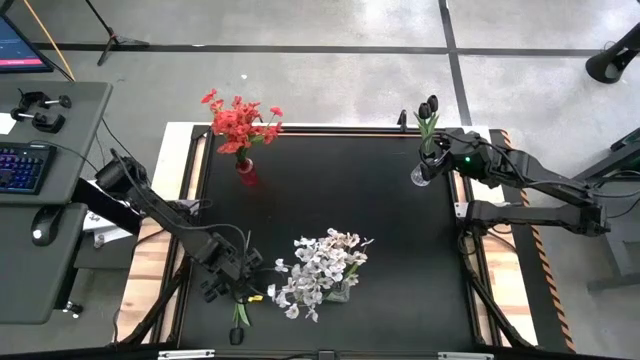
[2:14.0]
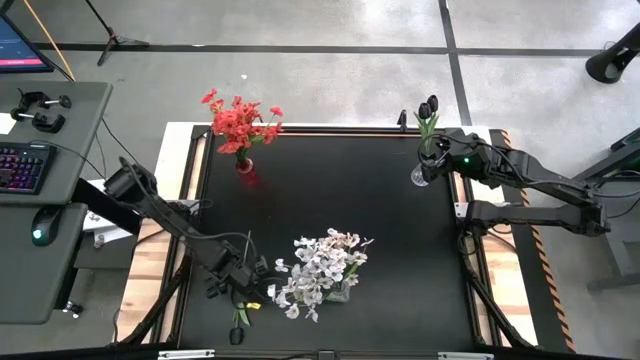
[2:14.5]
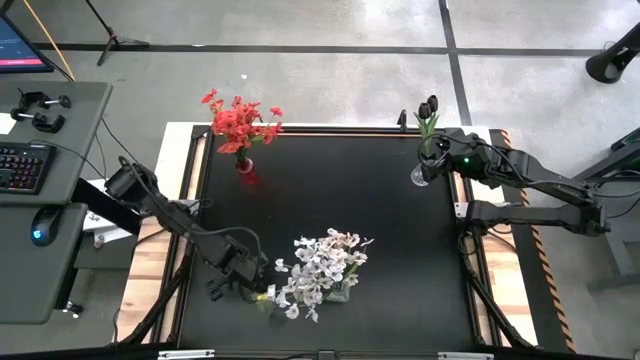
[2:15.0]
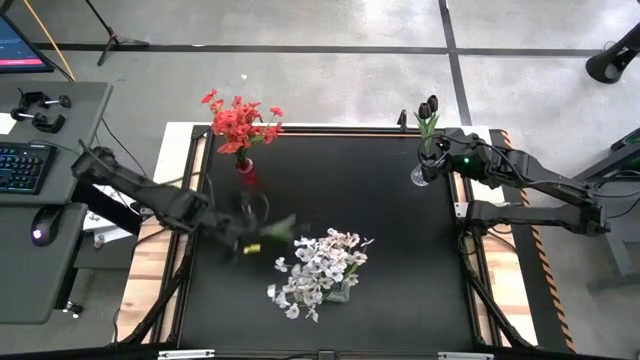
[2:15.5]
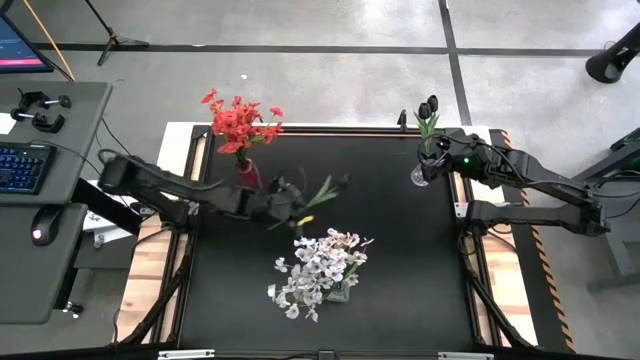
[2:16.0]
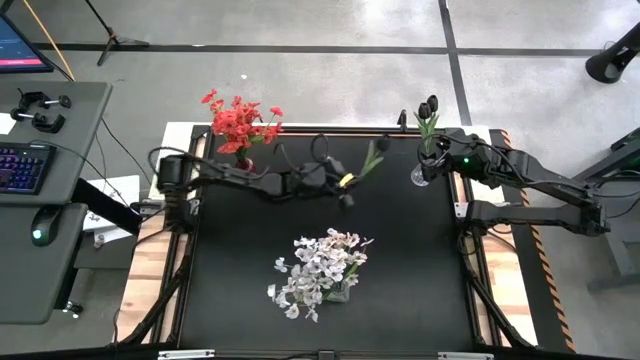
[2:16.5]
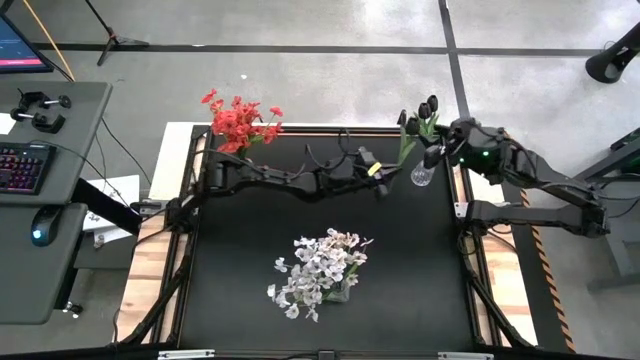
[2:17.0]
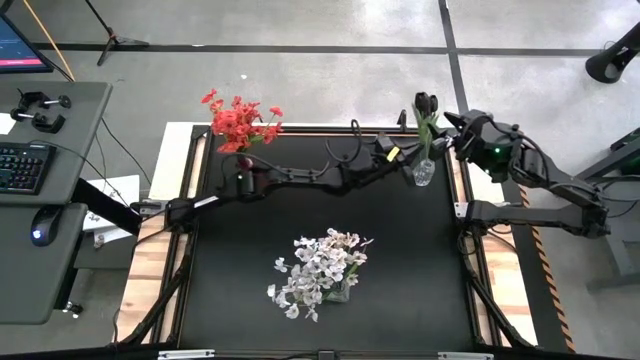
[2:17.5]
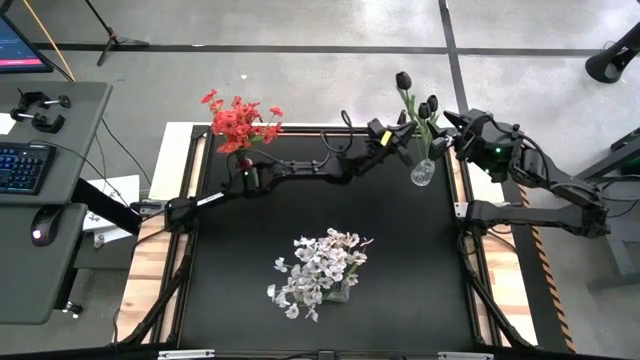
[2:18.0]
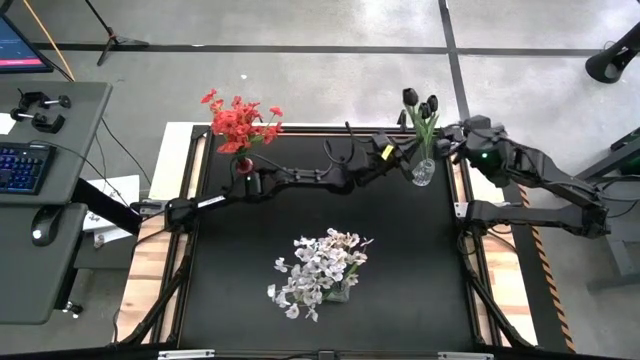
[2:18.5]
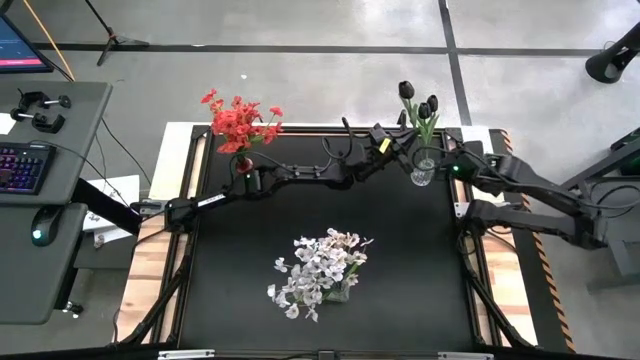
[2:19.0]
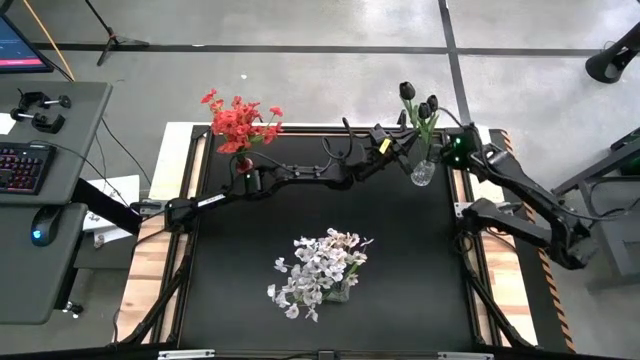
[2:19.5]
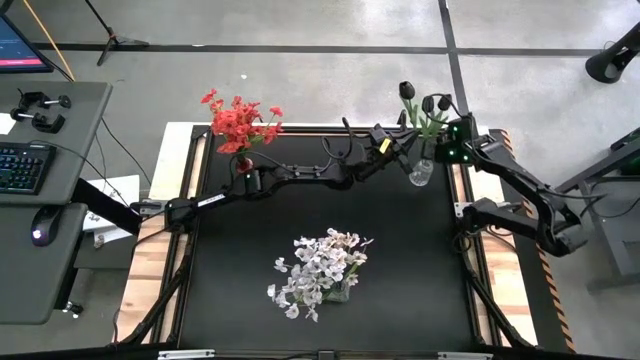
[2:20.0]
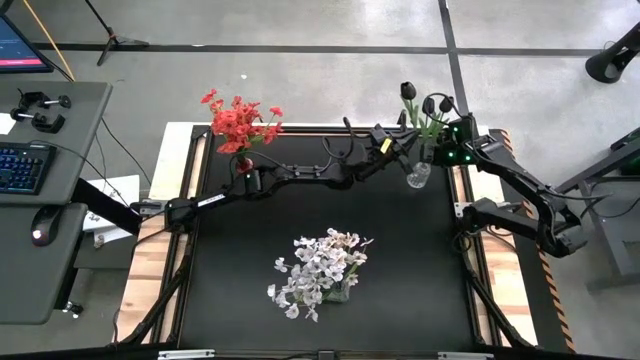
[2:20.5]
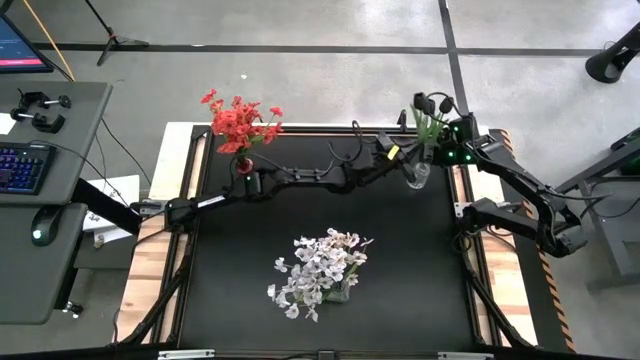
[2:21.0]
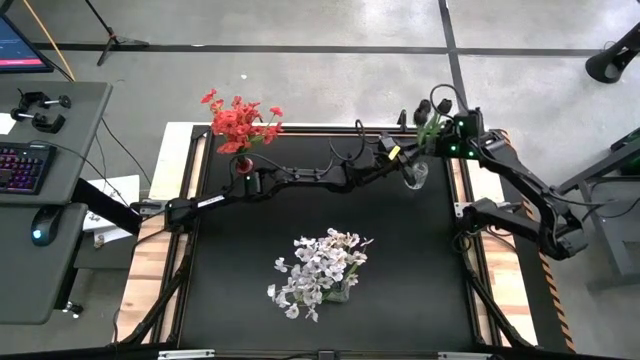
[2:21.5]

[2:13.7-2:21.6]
Task: Sort flowers into vase by color
Put the black tulip into the top transparent vase

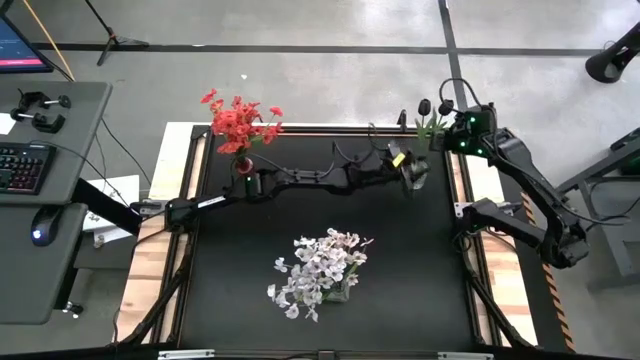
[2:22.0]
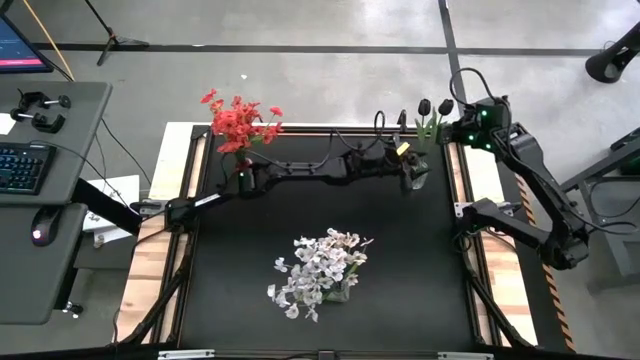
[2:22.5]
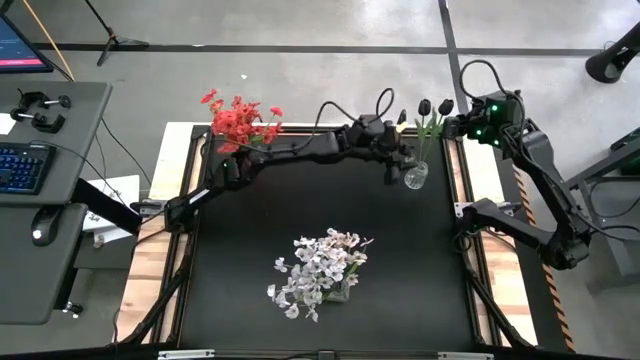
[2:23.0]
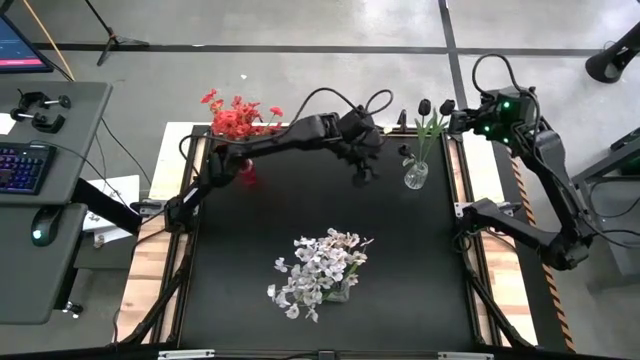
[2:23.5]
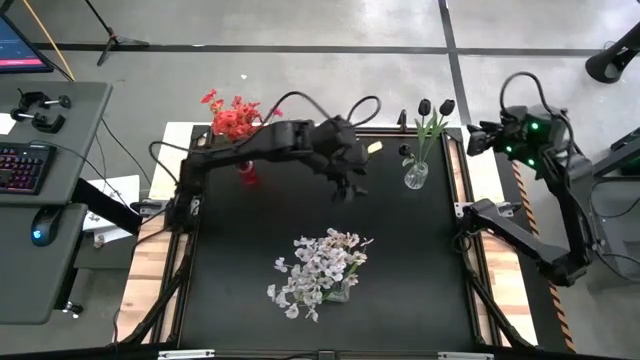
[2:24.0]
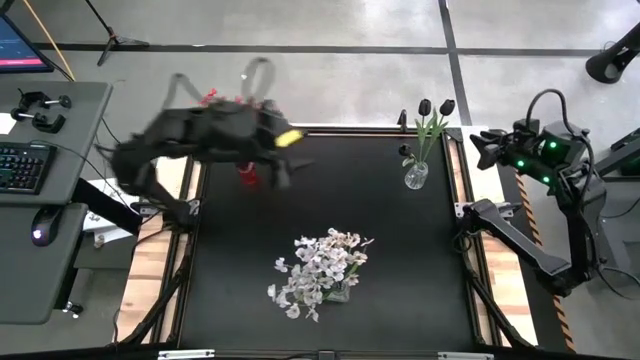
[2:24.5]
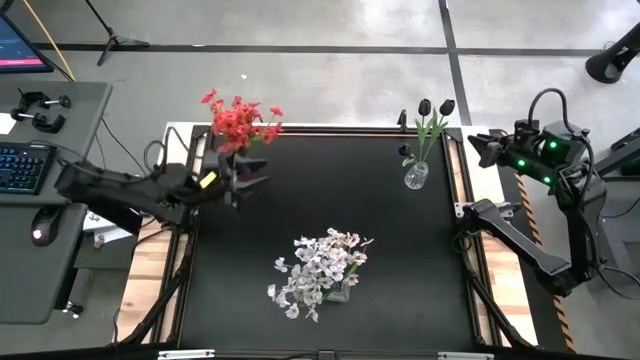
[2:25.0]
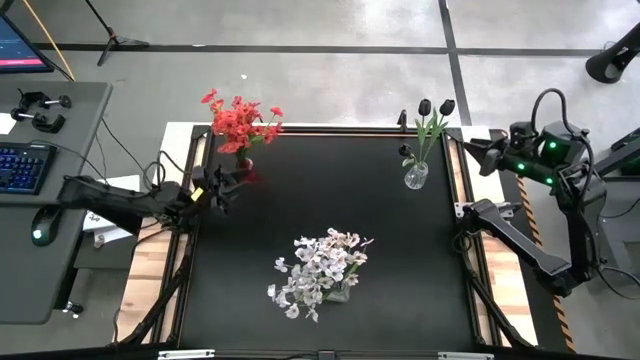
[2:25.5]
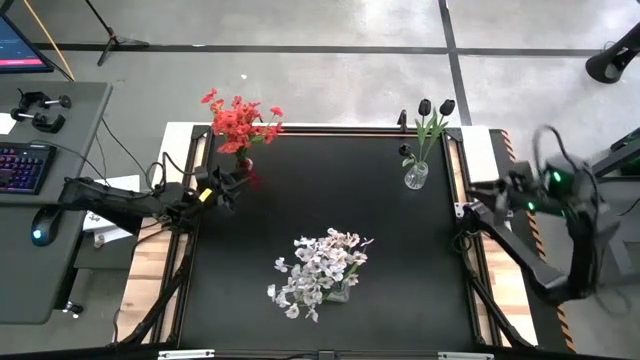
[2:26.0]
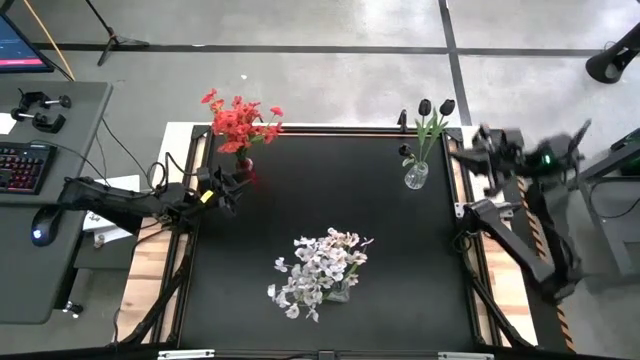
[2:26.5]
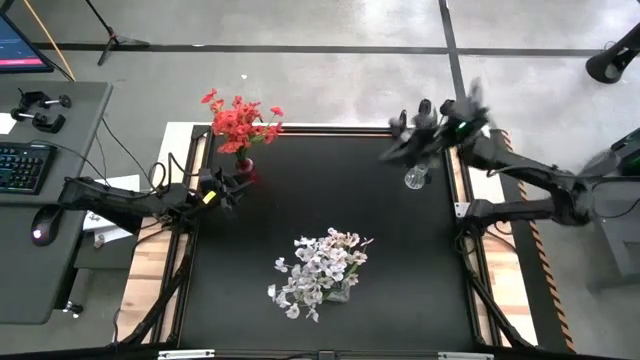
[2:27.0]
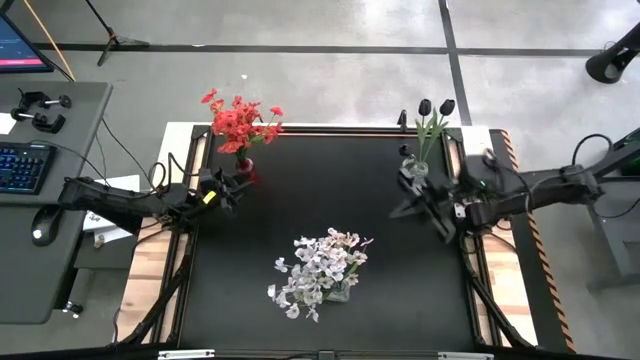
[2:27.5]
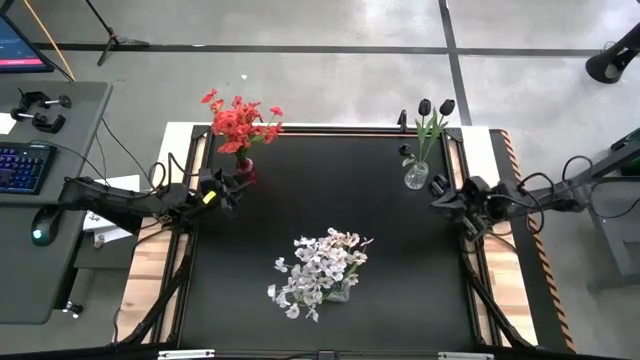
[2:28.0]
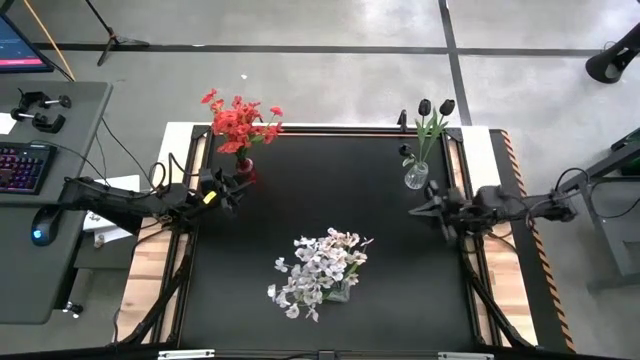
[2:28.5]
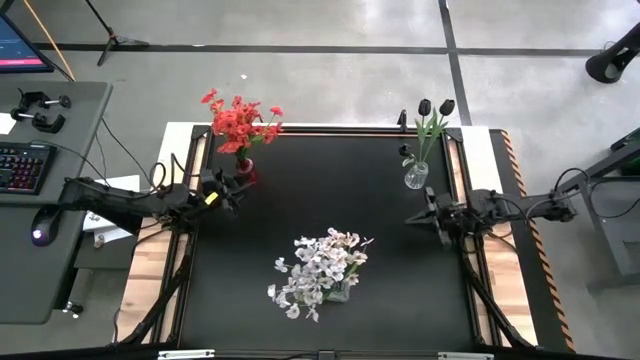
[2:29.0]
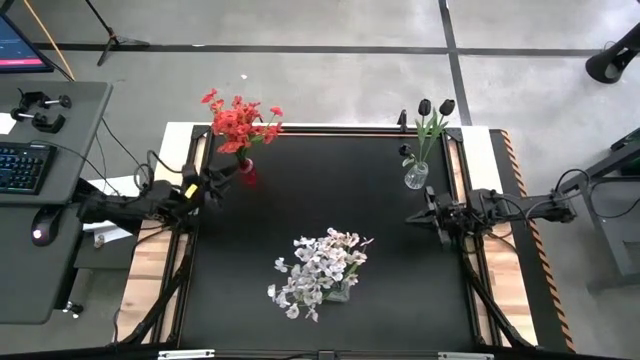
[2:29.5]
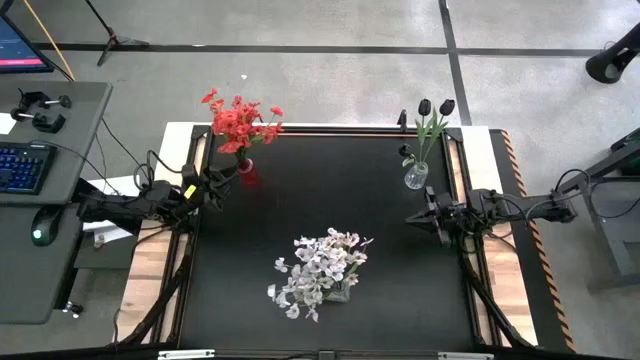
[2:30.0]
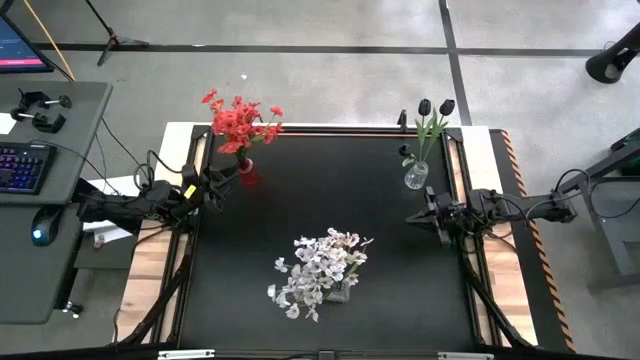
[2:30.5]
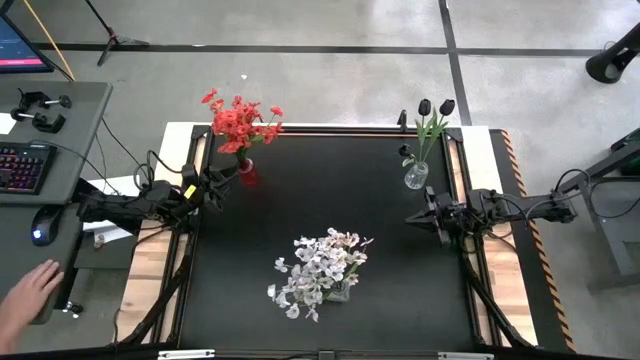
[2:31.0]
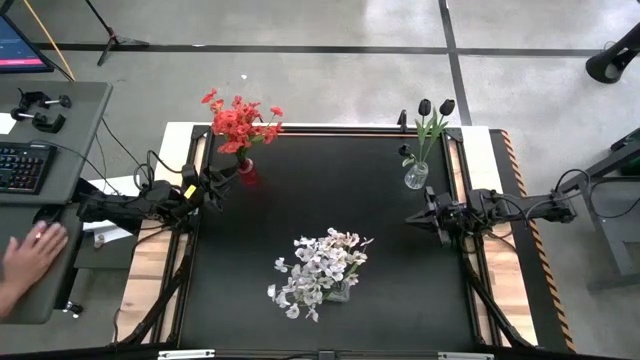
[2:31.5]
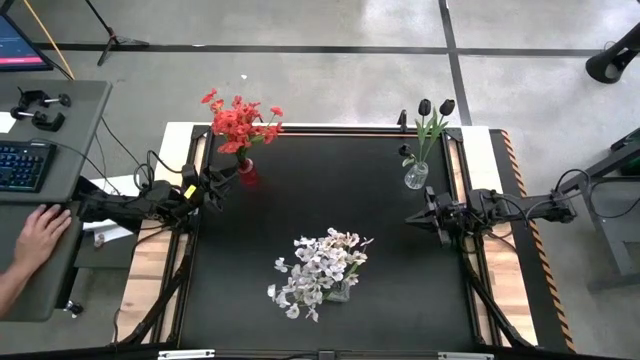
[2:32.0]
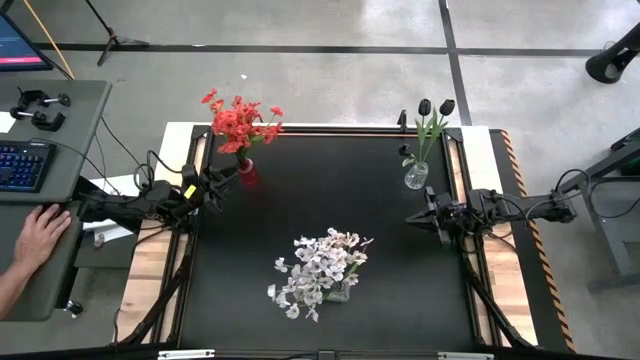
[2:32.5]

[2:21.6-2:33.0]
Return to Home Position

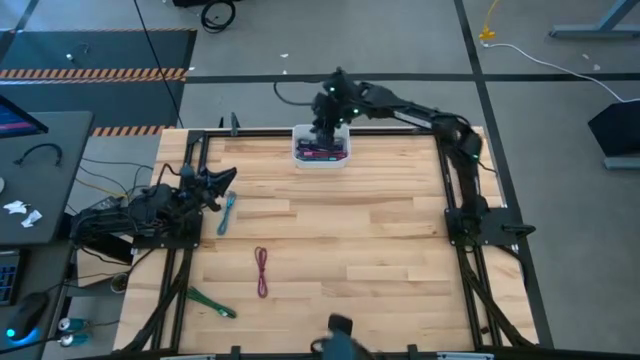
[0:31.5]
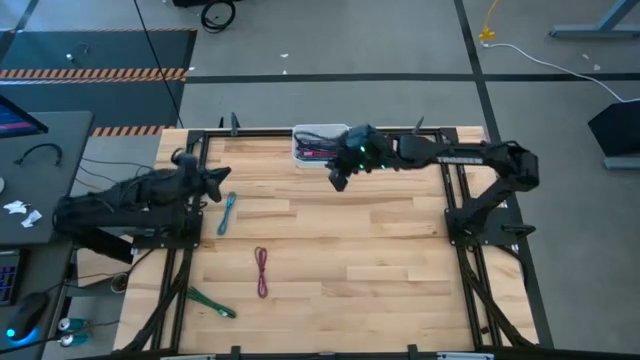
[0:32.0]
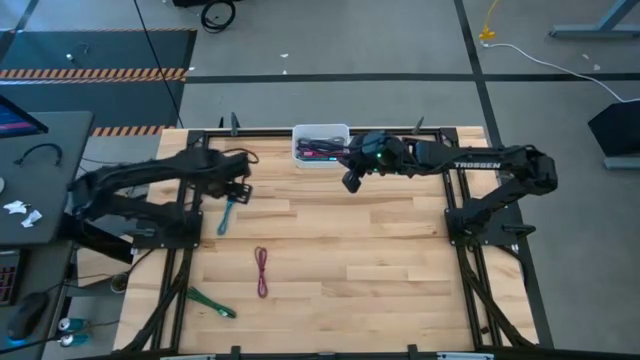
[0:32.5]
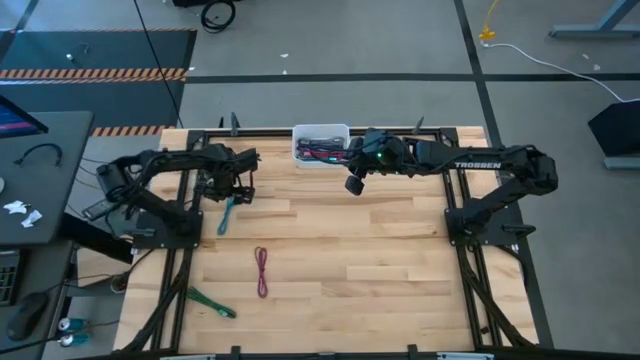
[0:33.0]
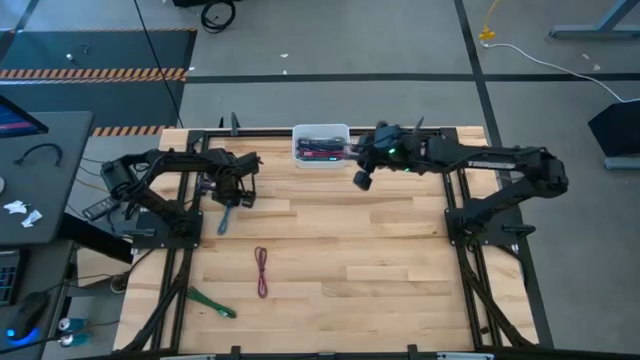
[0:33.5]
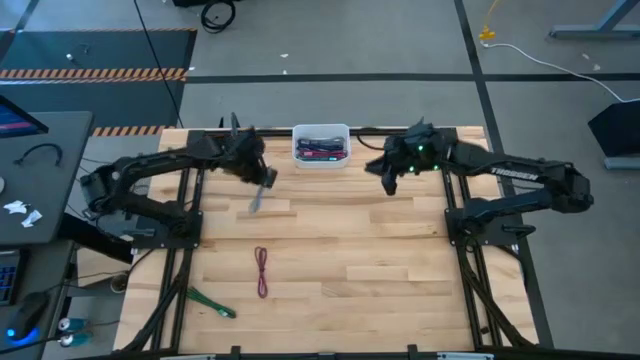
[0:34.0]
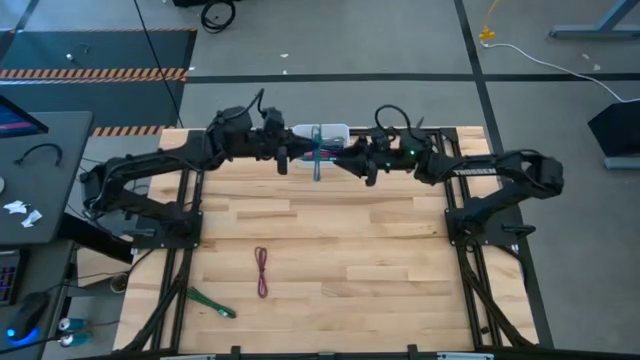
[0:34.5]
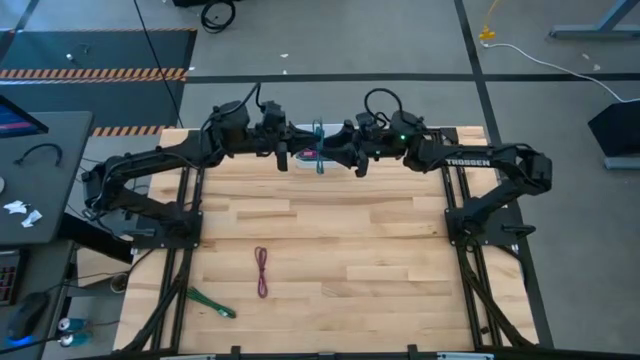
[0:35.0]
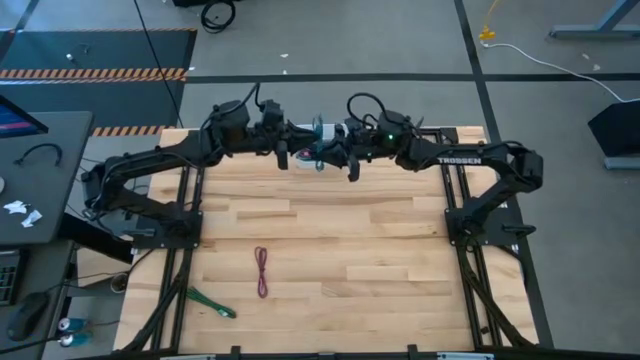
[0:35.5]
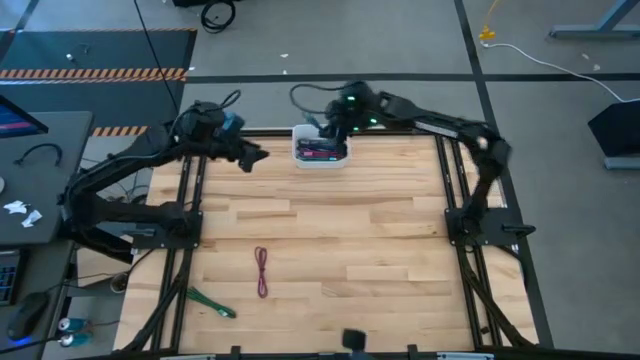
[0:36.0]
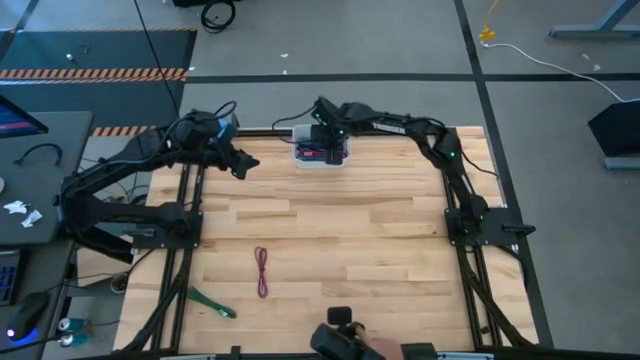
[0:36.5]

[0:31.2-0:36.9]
Task: Pick and place USB-C Cables
Put the light blue charger cable into the white bin
